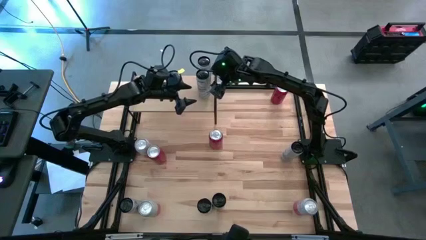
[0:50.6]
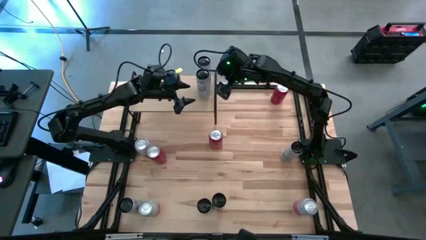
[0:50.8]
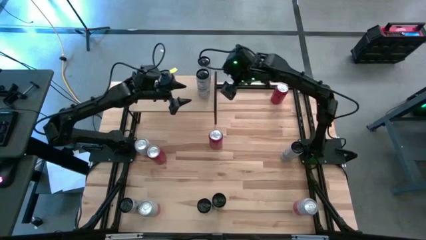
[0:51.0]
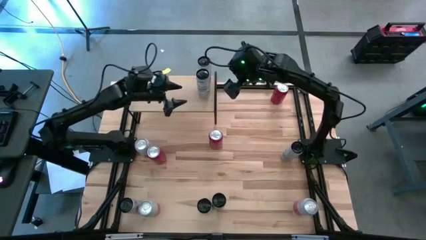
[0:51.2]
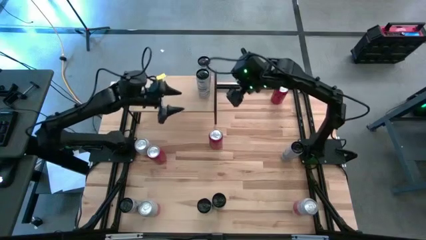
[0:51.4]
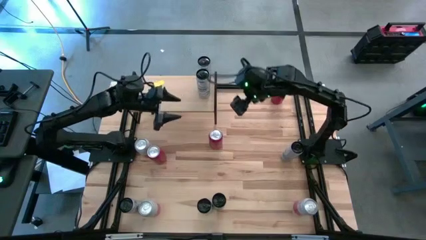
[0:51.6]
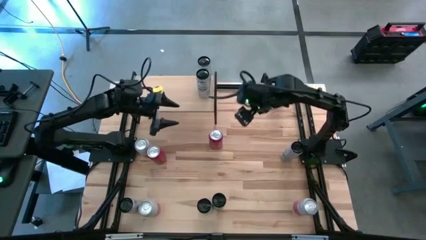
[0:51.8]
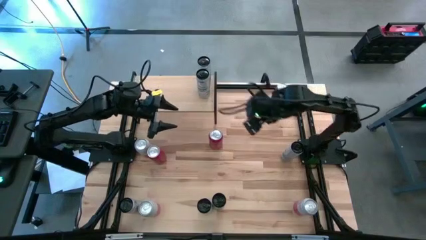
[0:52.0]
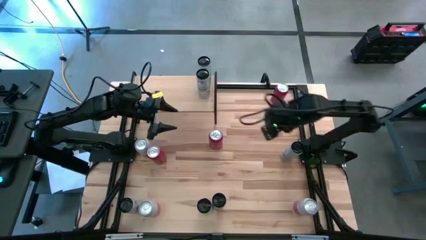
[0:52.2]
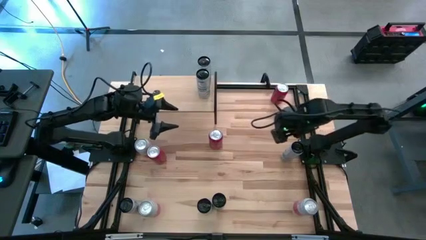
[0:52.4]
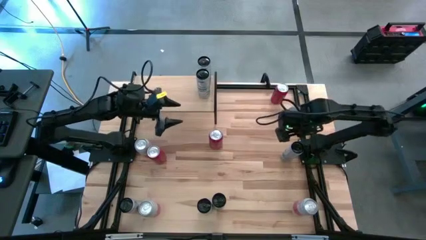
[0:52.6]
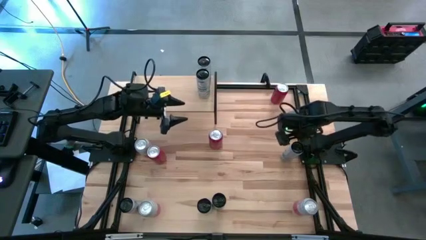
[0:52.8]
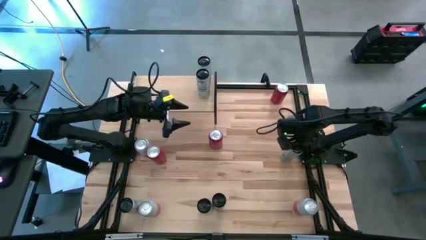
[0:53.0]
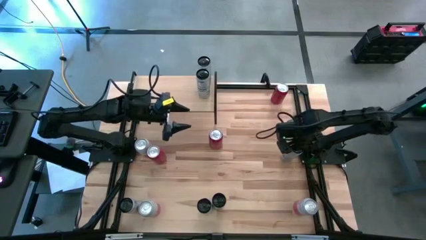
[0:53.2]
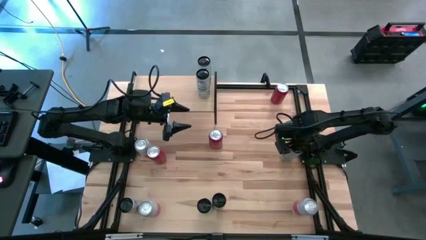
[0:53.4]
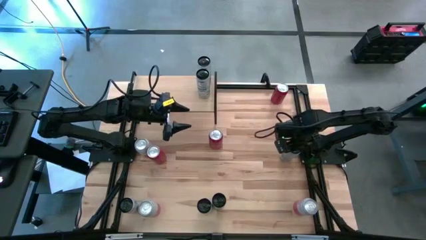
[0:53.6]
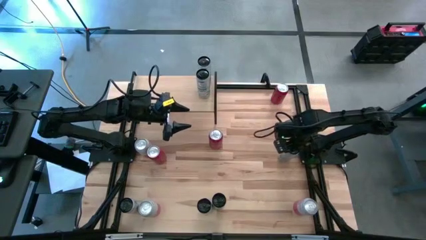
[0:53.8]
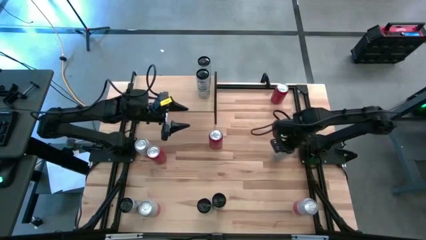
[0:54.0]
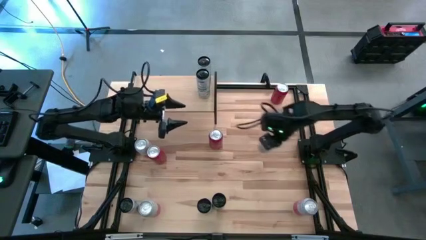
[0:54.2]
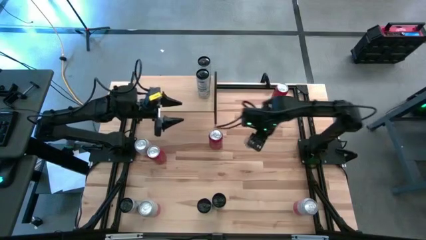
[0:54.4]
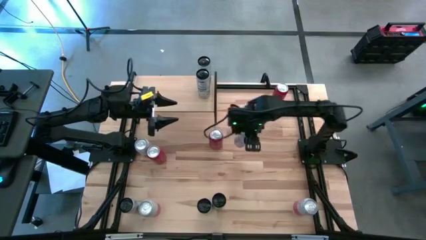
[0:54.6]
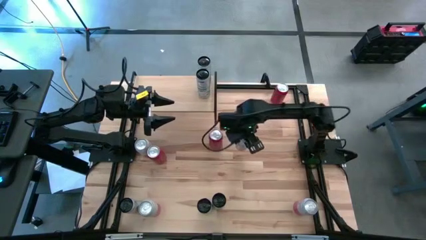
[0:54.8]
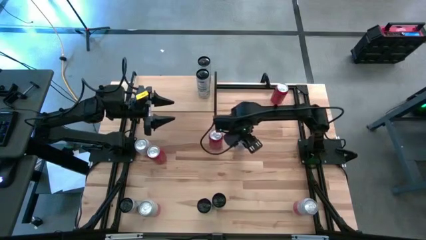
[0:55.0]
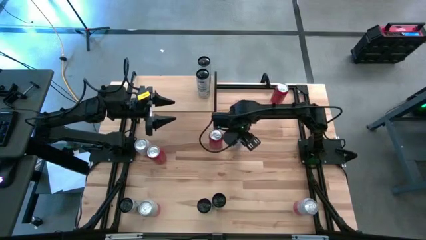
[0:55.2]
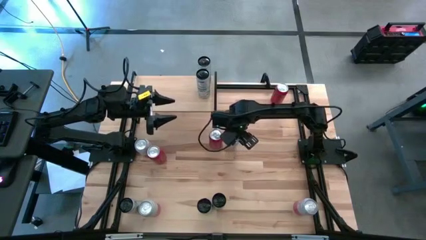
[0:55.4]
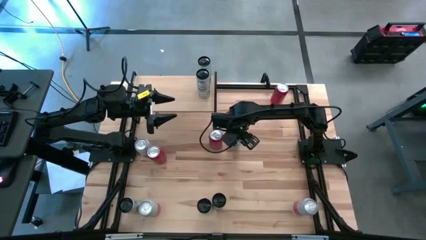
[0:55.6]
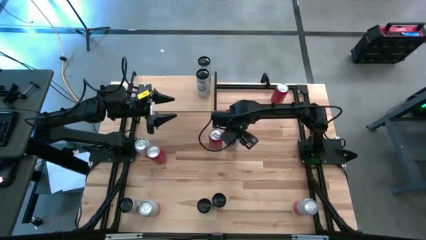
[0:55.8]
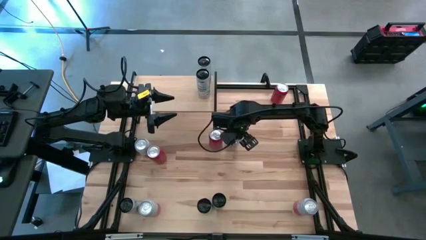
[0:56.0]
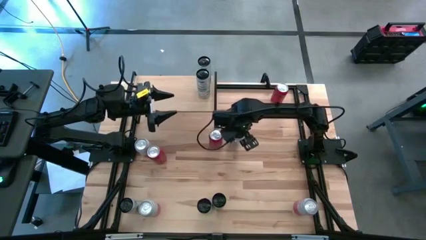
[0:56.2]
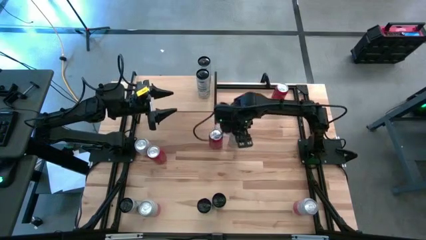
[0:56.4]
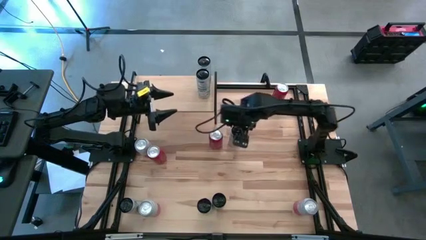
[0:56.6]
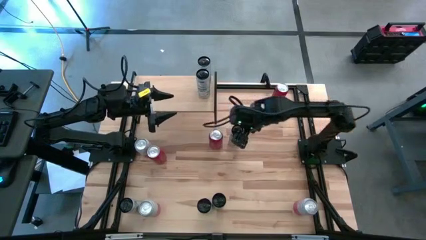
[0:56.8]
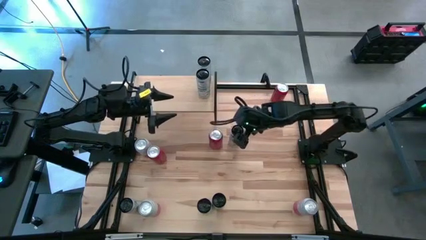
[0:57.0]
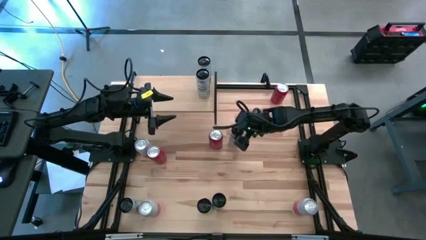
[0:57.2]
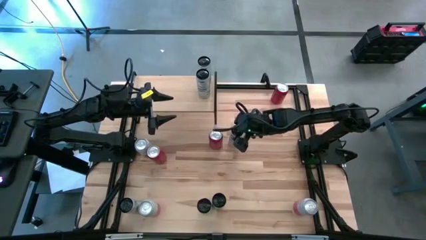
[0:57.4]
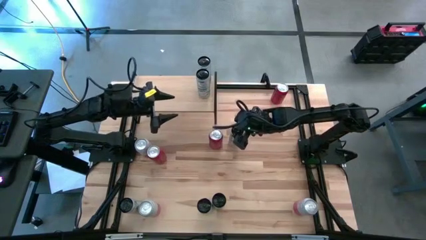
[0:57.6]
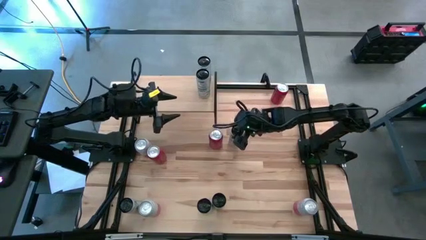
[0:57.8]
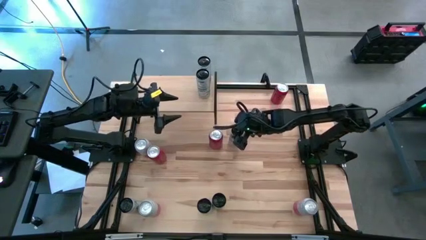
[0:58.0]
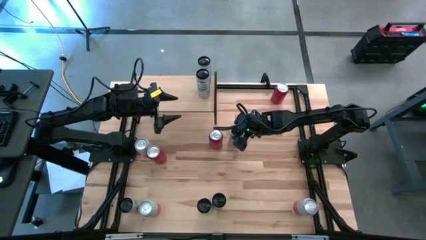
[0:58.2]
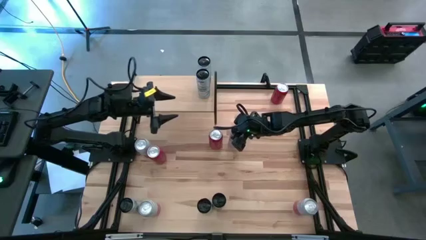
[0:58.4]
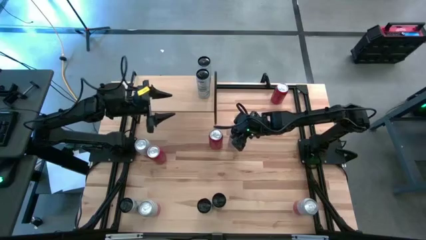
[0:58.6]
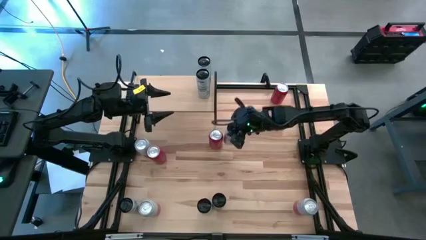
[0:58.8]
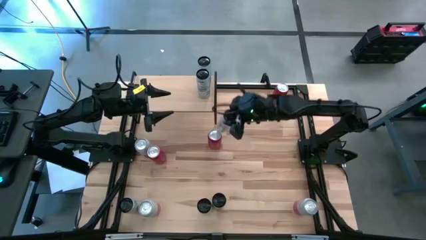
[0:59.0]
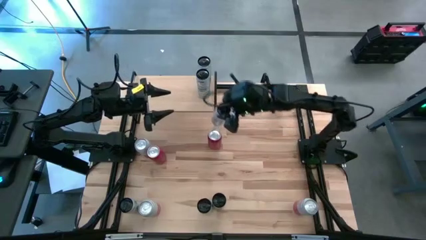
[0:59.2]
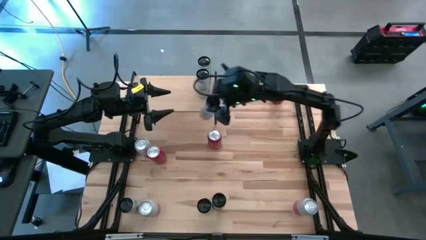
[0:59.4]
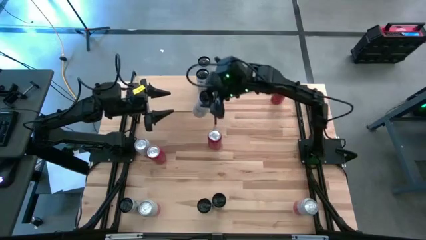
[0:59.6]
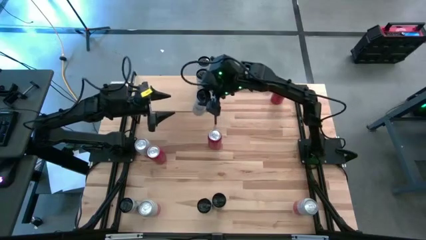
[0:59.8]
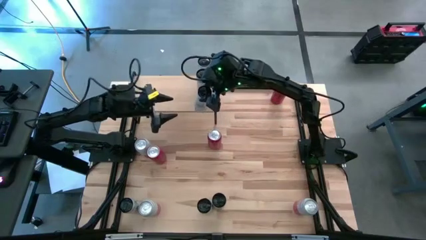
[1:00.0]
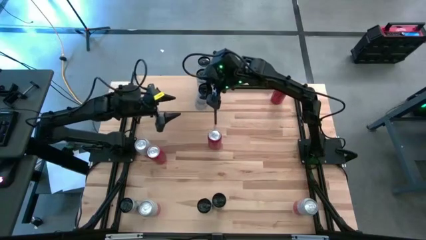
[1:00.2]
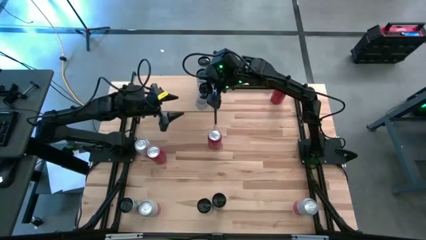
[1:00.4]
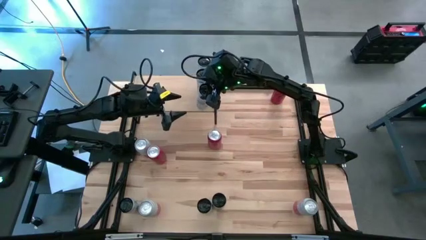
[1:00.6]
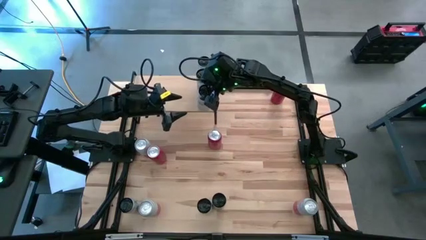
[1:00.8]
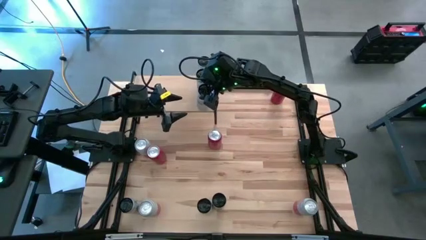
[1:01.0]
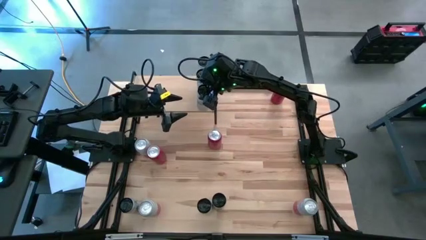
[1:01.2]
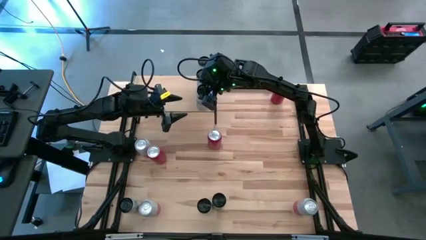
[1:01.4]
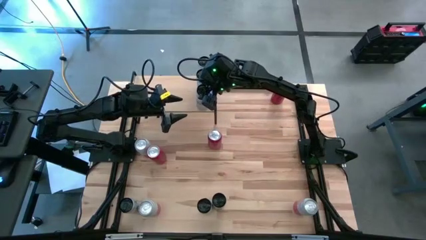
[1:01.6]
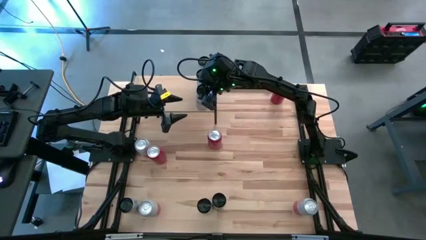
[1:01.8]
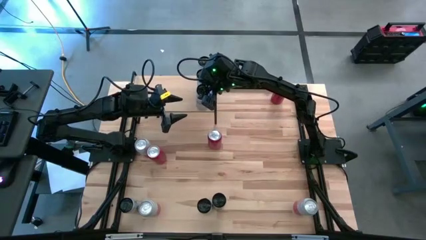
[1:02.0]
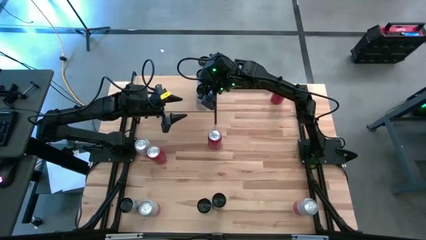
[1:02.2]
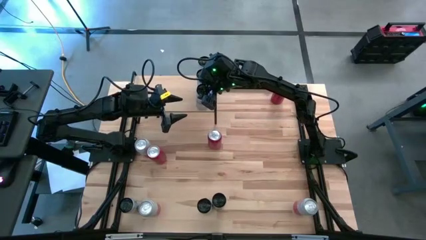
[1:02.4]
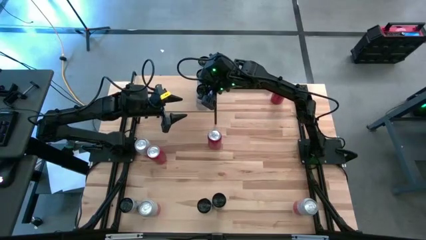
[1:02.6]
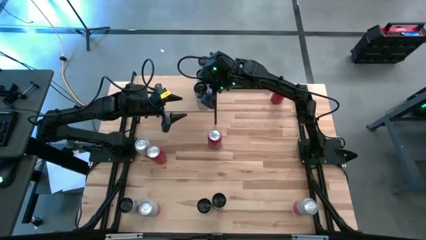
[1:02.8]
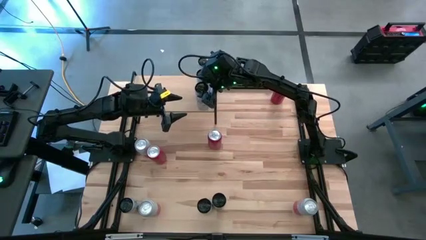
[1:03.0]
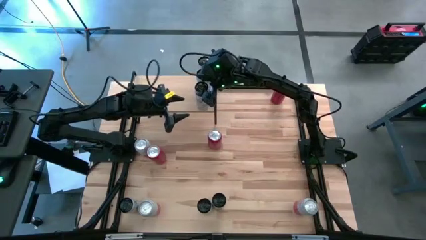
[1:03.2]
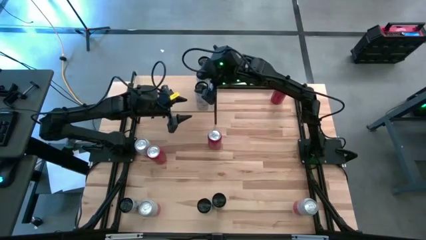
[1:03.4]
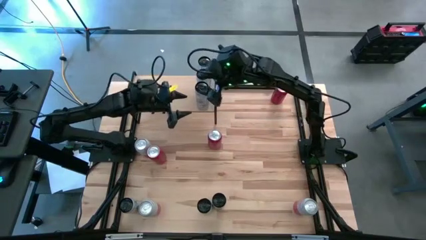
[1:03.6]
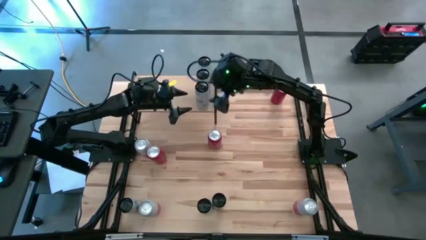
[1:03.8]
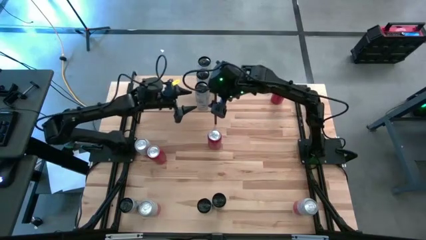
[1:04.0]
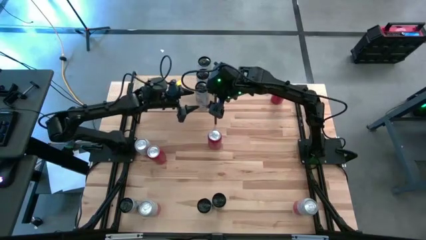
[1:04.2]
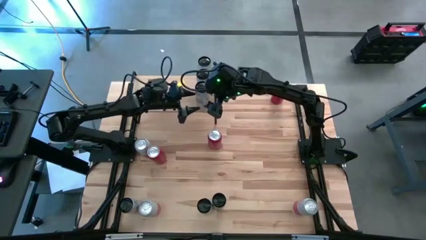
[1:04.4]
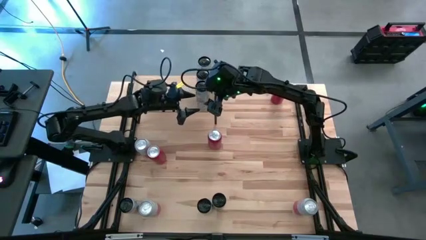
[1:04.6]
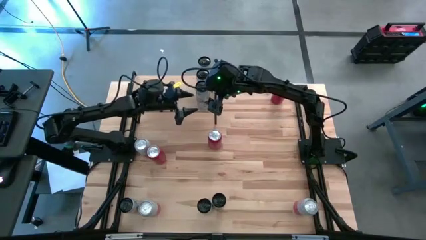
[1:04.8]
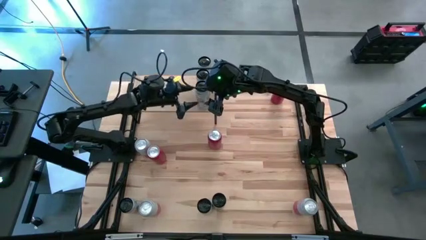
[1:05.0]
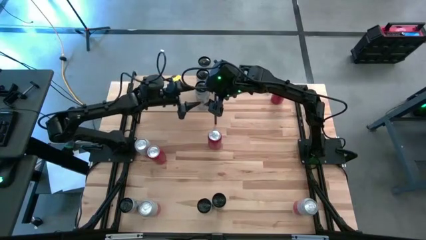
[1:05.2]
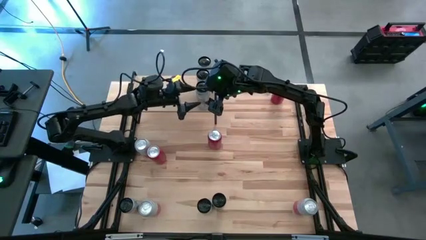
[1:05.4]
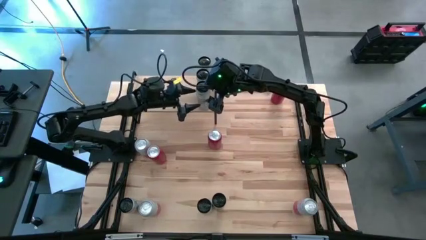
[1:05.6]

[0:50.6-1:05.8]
Task: Place canned beverage on shelf
Put the blue soda can on the shelf aligned with the other blue soda cans
